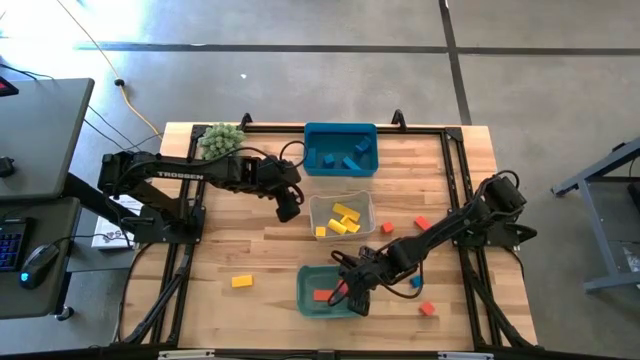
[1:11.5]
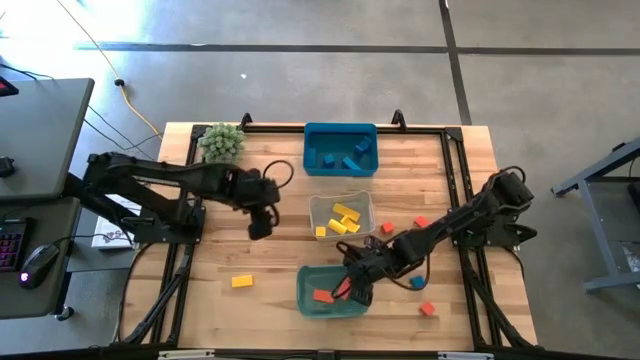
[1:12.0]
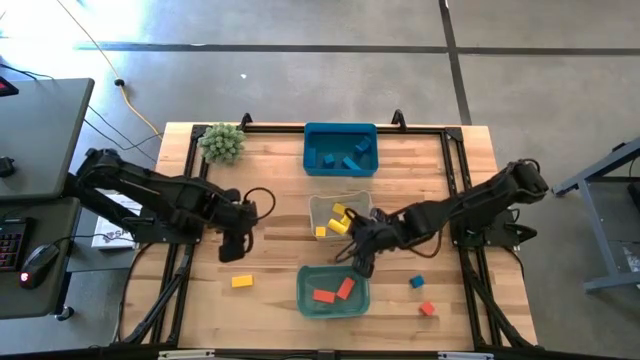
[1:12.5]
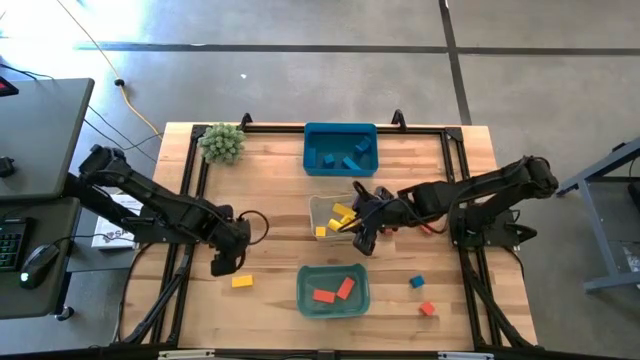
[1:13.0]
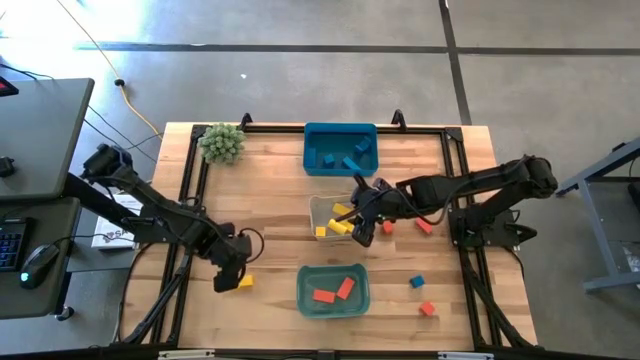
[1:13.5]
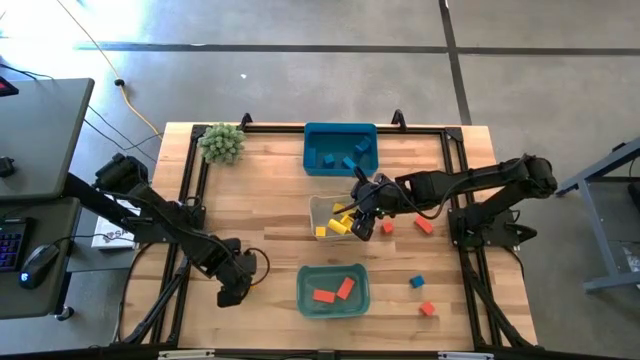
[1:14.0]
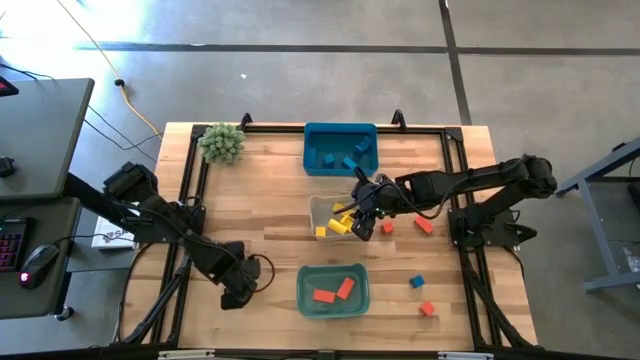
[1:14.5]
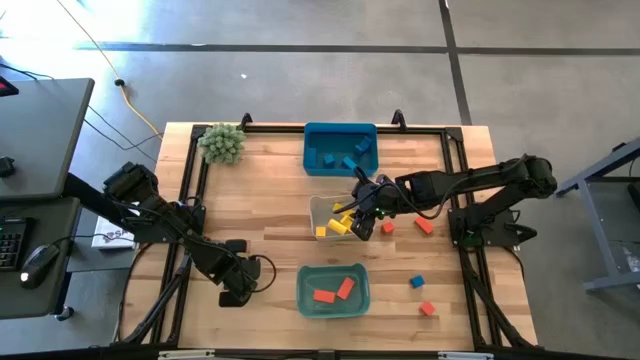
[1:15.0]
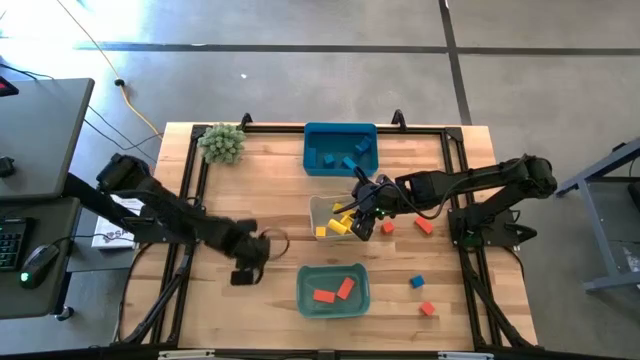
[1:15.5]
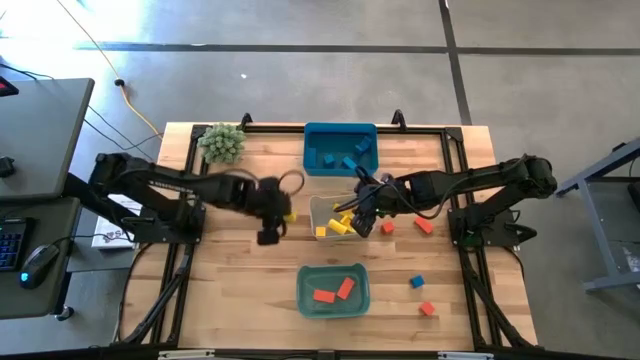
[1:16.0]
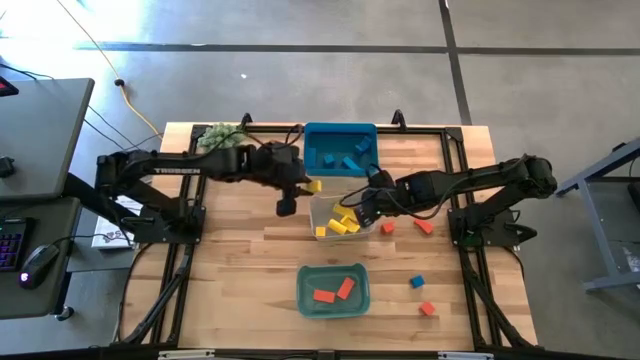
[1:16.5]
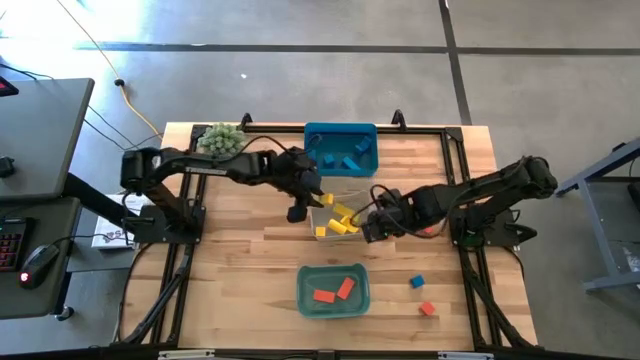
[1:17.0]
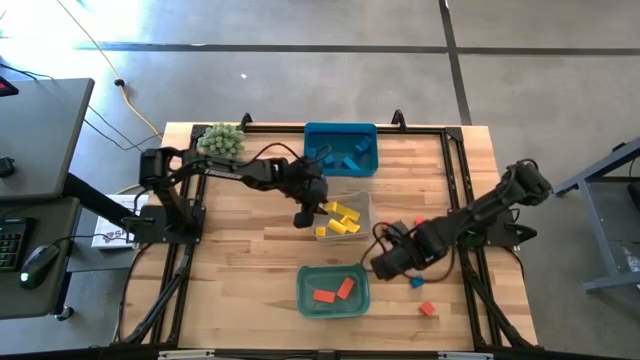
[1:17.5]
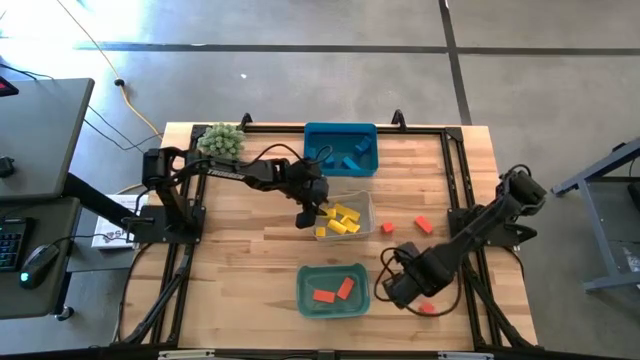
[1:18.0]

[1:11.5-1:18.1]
Task: Sort & place blocks by color
Put the yellow block into the white bin

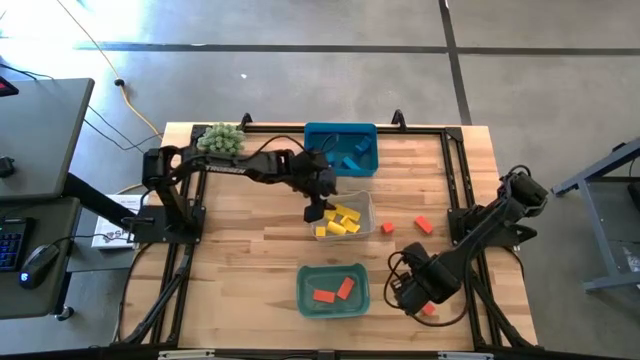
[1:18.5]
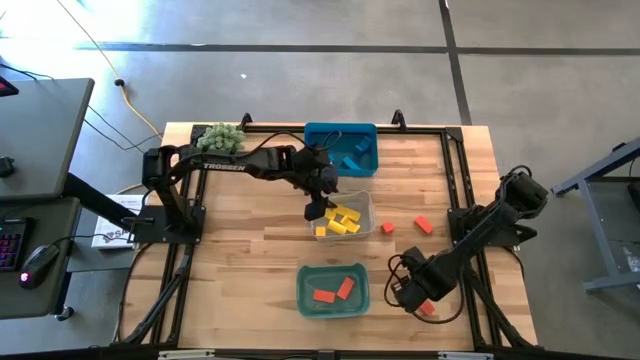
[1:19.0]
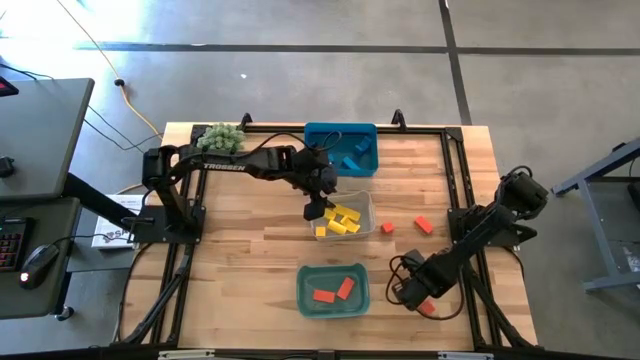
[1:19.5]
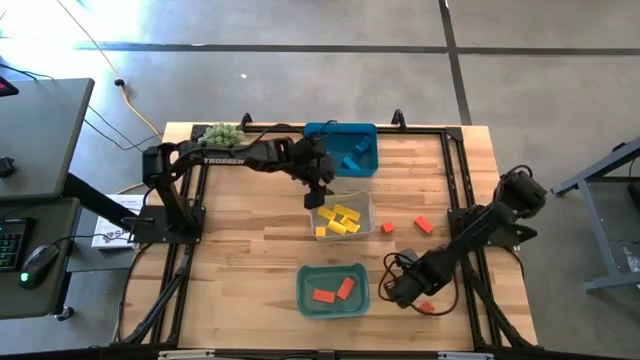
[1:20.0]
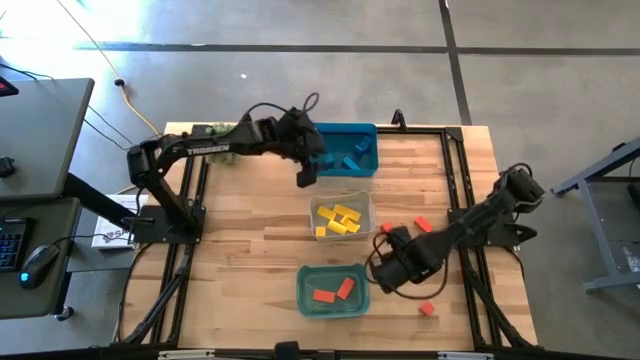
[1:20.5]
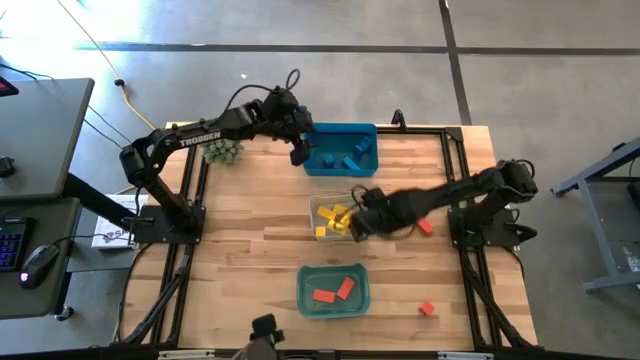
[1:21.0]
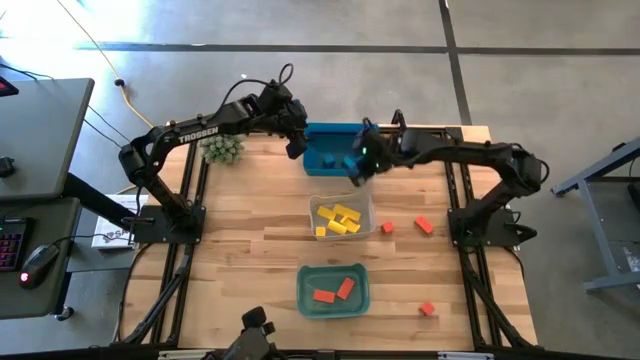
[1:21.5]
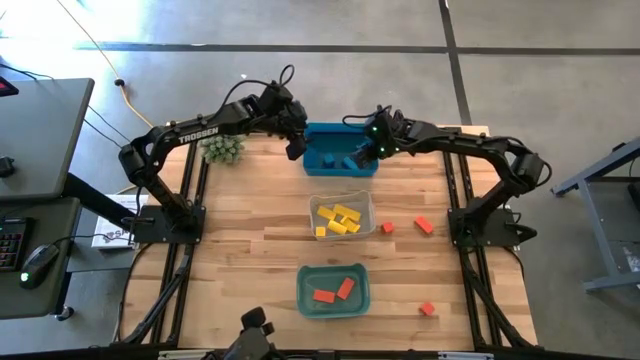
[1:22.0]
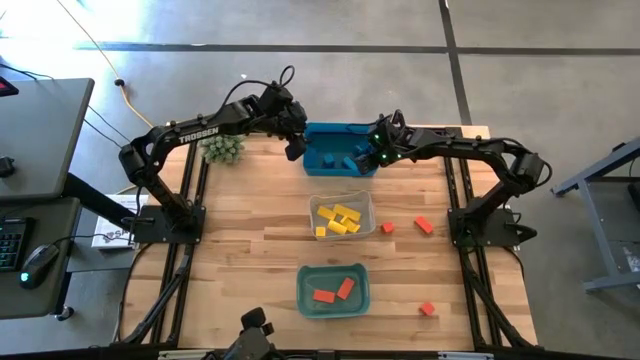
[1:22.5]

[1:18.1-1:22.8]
Put the blue block into the blue bin

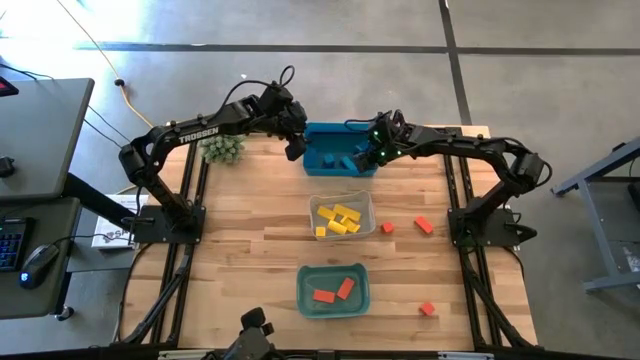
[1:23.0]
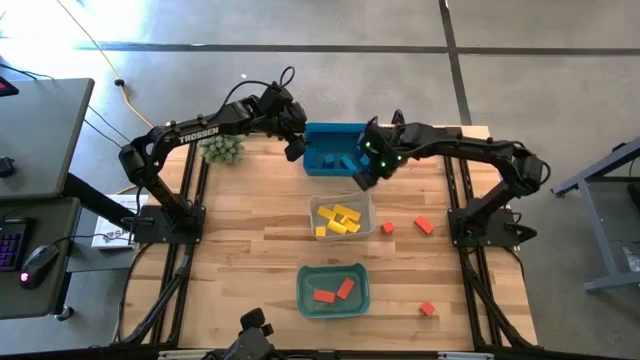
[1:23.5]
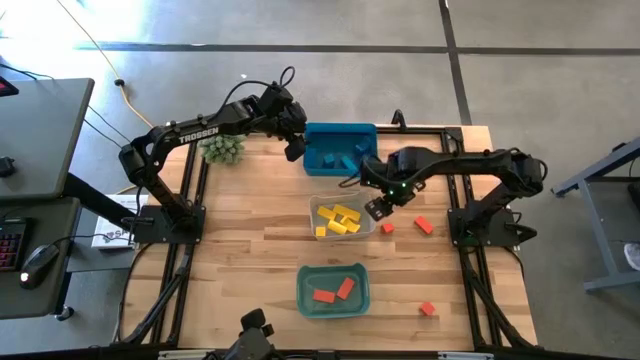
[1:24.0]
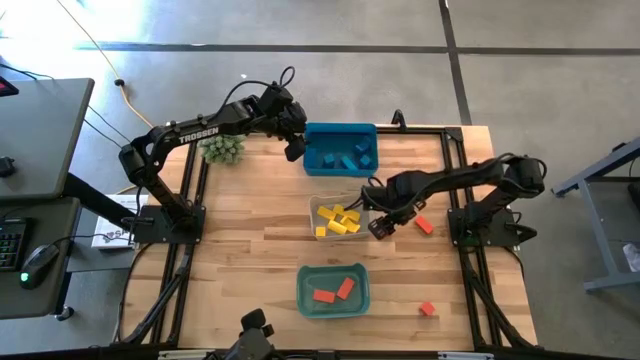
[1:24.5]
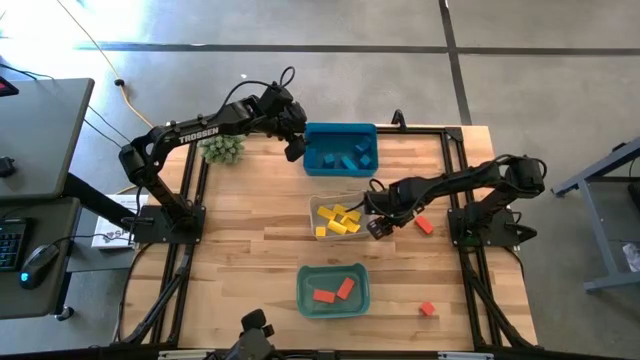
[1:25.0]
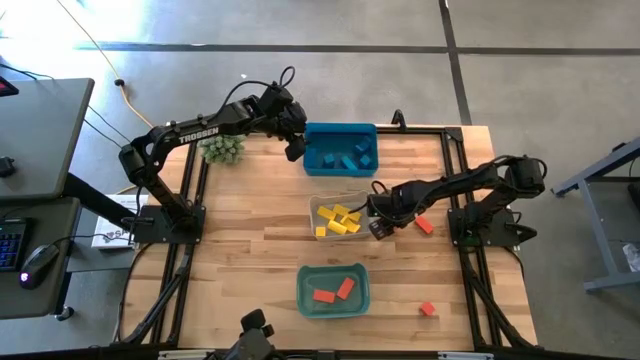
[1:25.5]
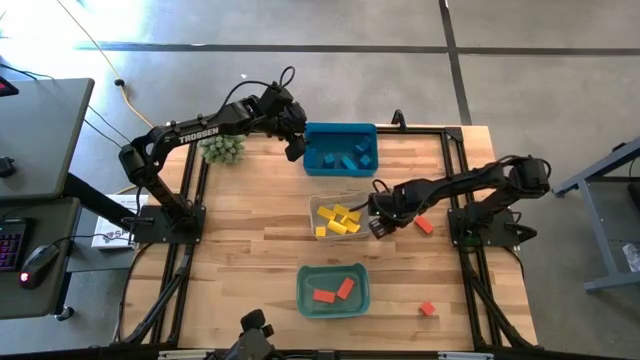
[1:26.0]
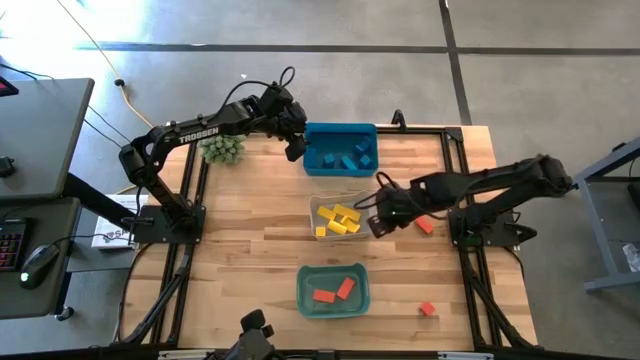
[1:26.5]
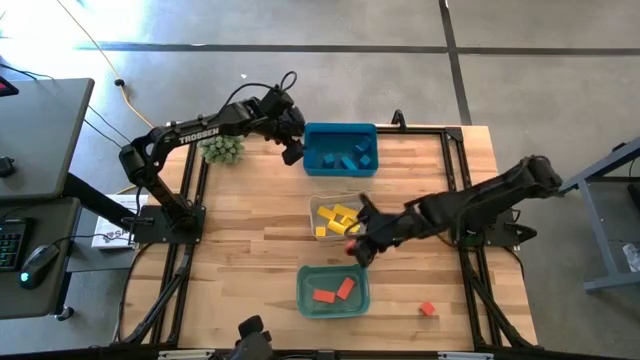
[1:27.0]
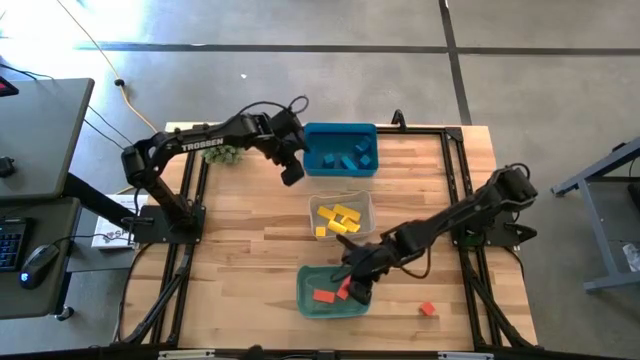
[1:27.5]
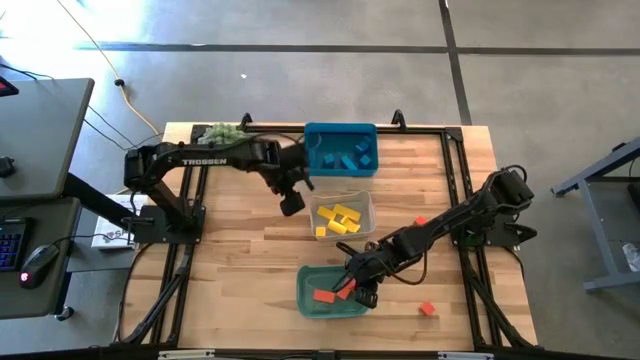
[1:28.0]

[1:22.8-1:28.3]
Put the orange block into the green bin

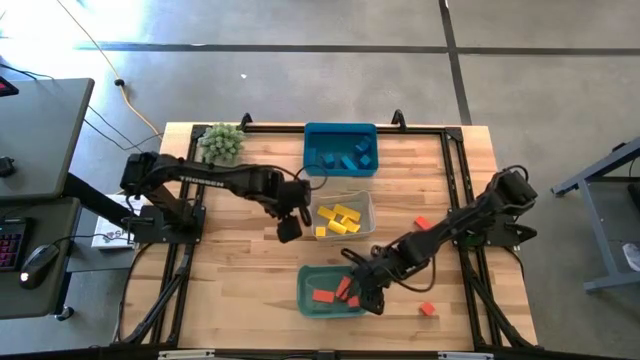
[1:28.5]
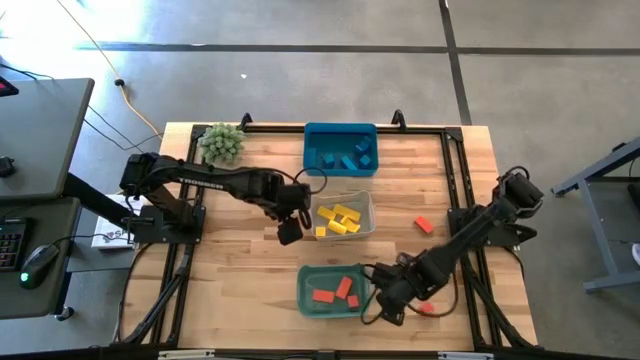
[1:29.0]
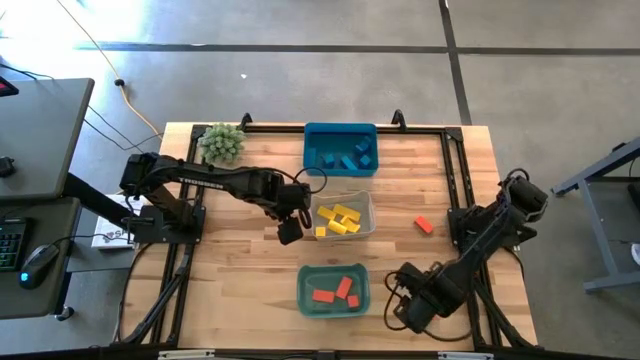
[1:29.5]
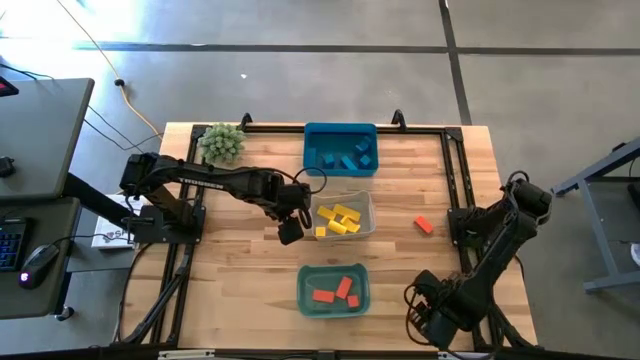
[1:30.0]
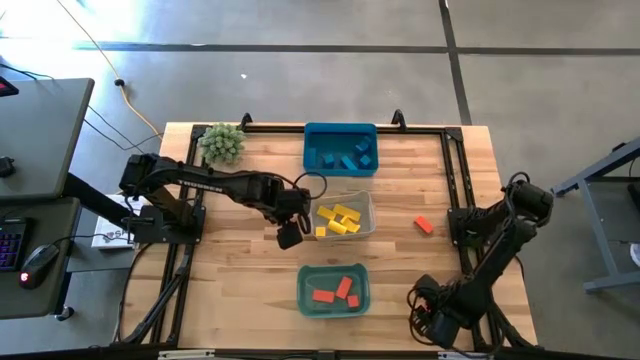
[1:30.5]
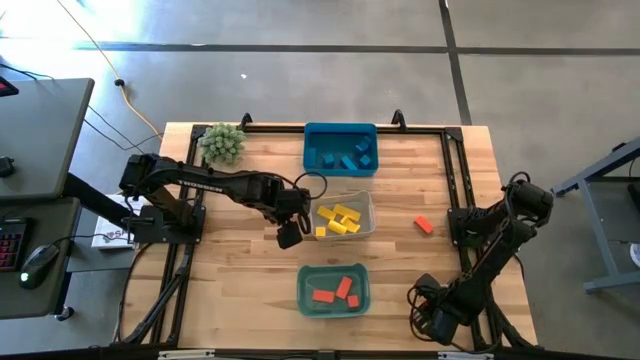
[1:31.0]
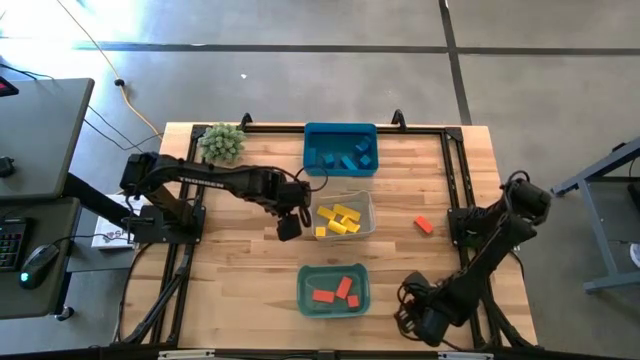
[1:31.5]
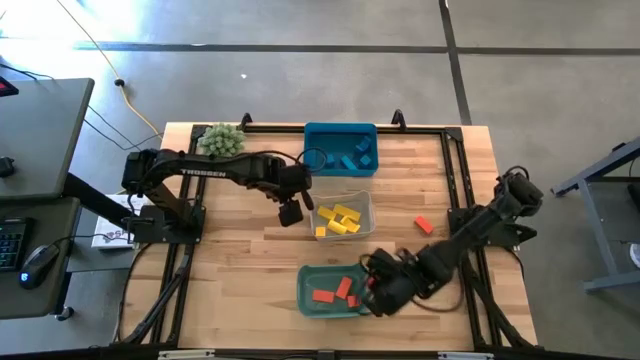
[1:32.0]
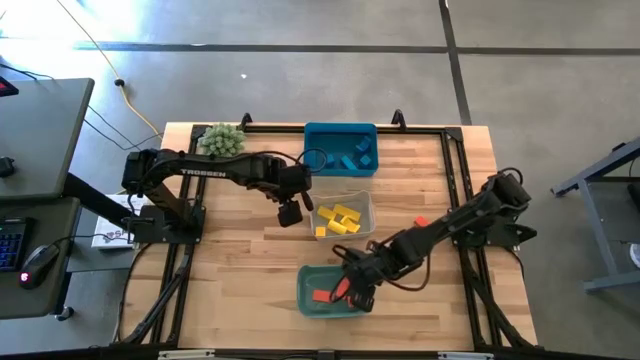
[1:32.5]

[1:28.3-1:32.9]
Put the orange block into the green bin
